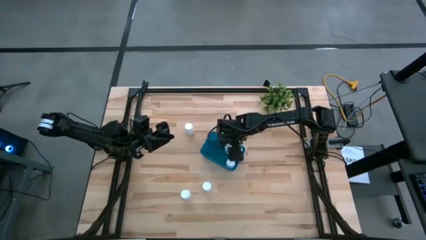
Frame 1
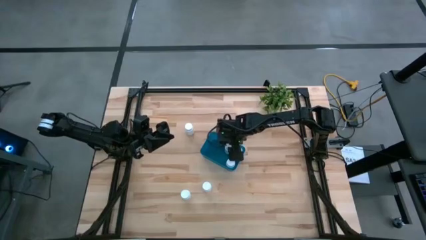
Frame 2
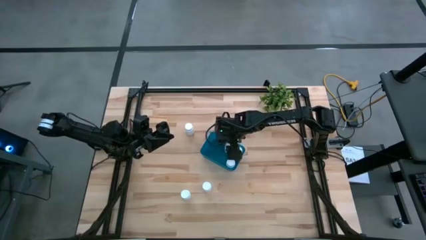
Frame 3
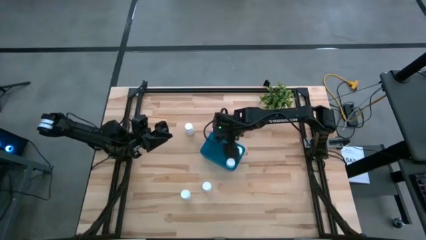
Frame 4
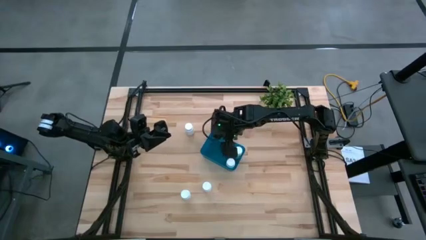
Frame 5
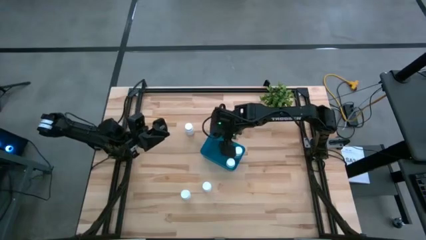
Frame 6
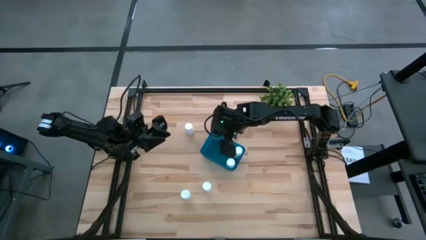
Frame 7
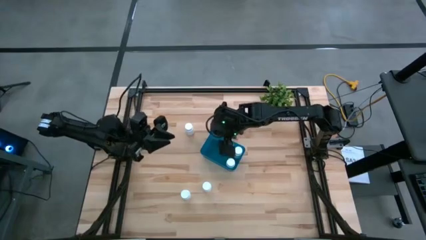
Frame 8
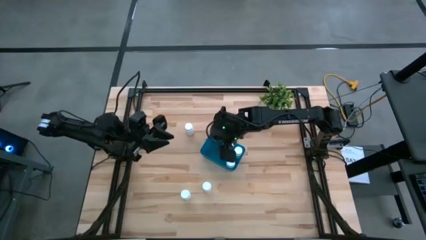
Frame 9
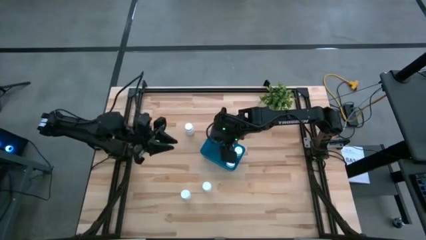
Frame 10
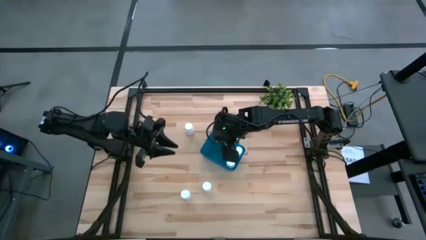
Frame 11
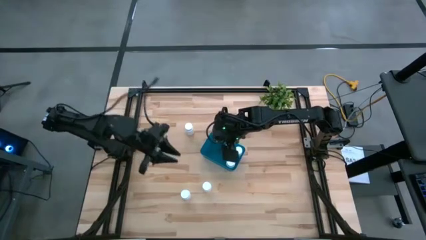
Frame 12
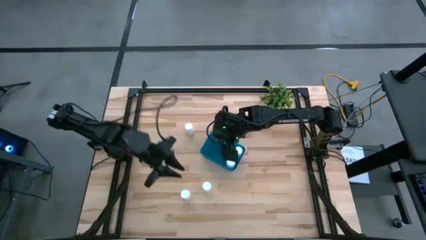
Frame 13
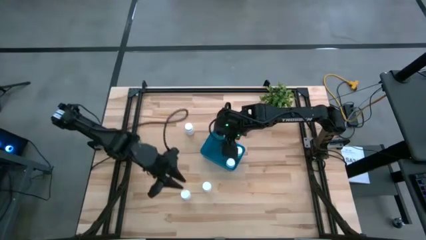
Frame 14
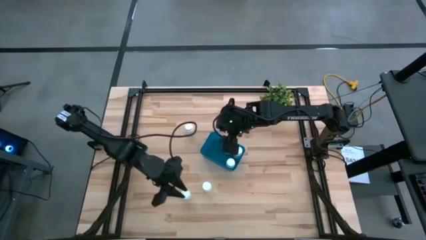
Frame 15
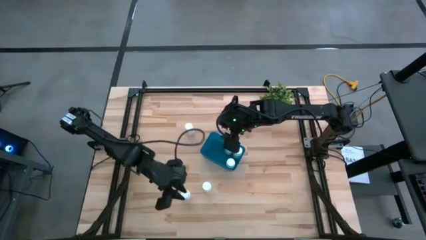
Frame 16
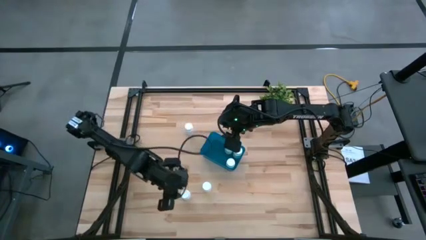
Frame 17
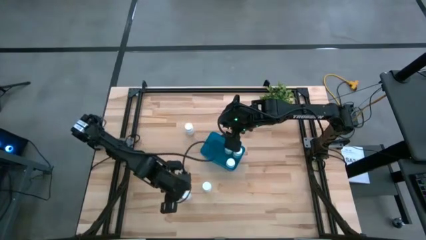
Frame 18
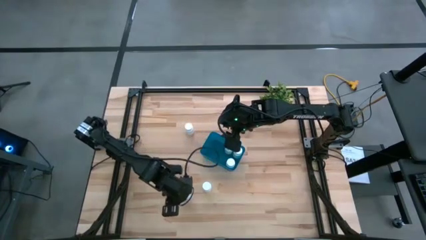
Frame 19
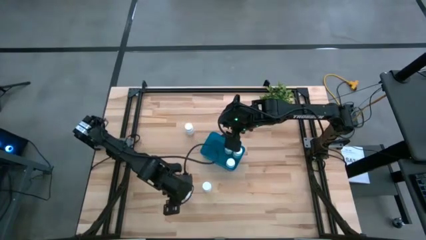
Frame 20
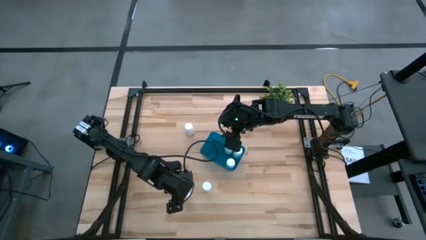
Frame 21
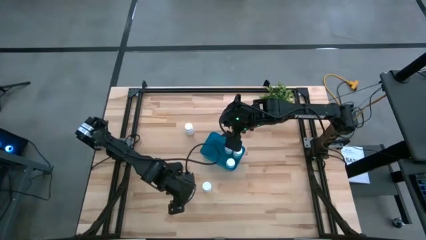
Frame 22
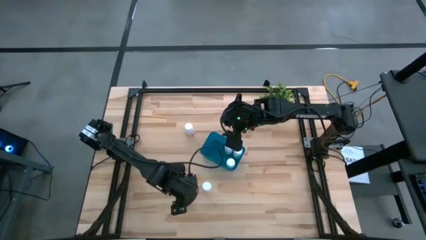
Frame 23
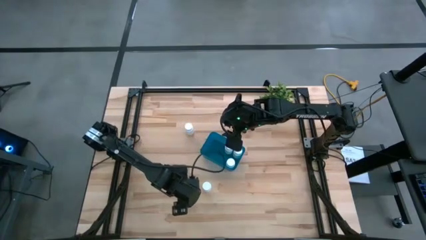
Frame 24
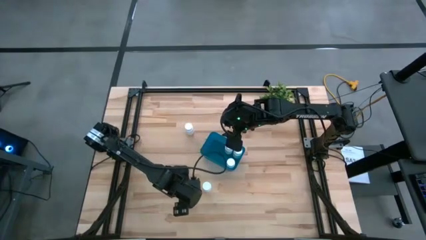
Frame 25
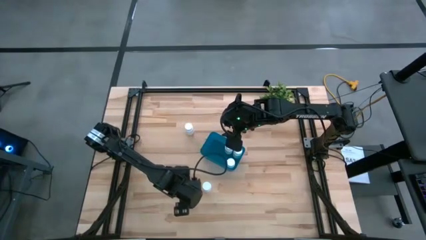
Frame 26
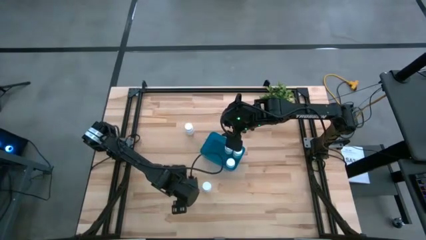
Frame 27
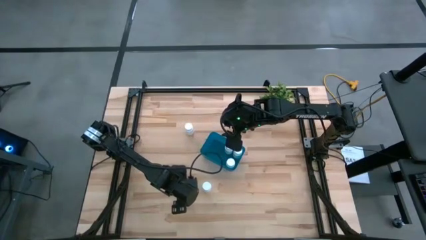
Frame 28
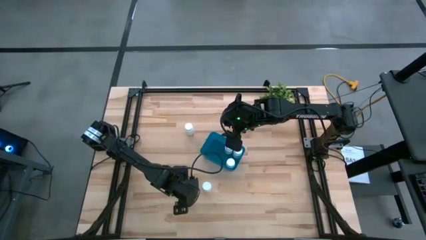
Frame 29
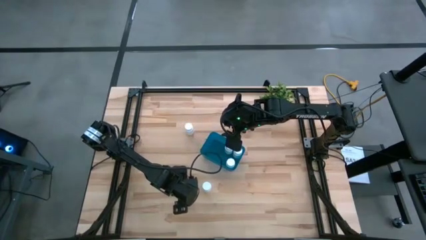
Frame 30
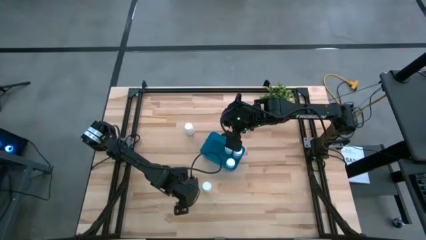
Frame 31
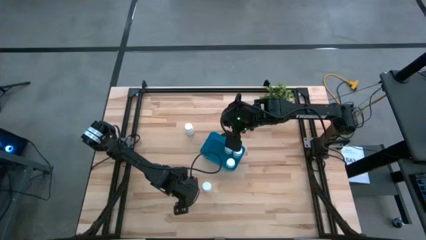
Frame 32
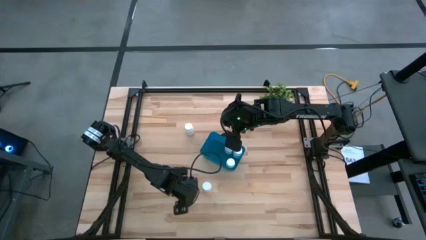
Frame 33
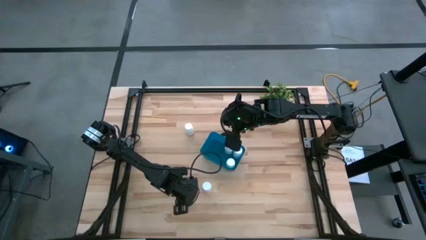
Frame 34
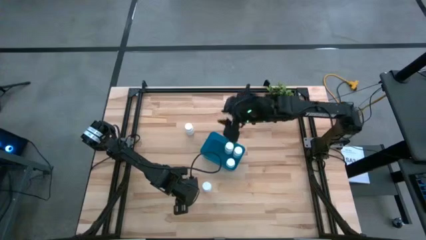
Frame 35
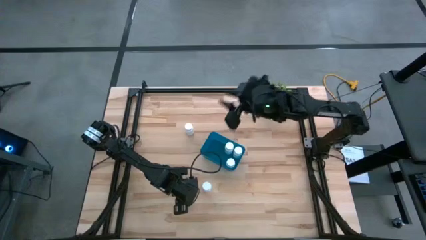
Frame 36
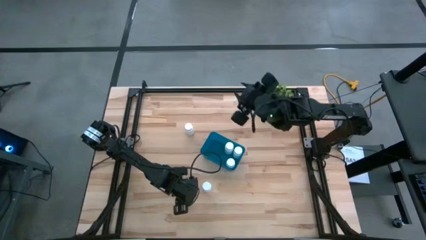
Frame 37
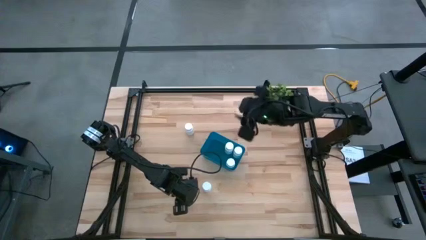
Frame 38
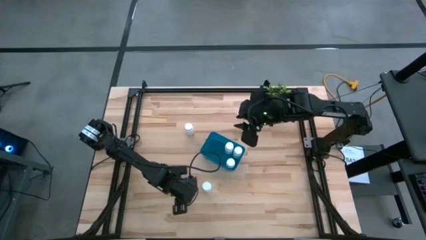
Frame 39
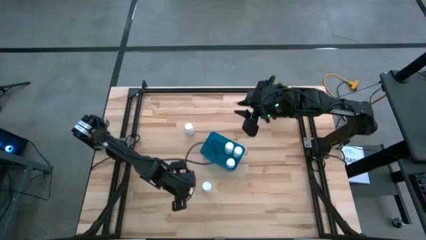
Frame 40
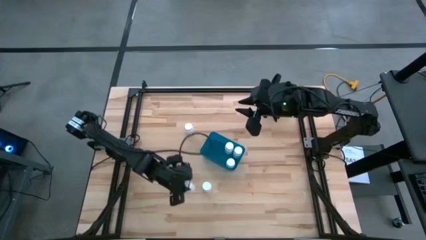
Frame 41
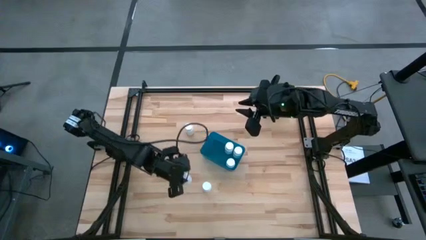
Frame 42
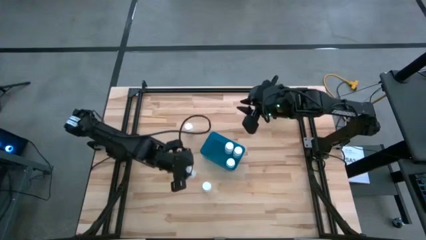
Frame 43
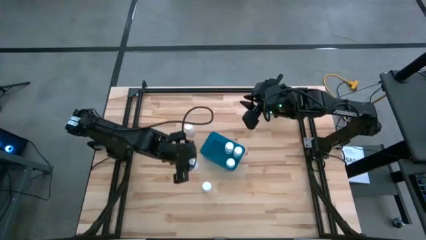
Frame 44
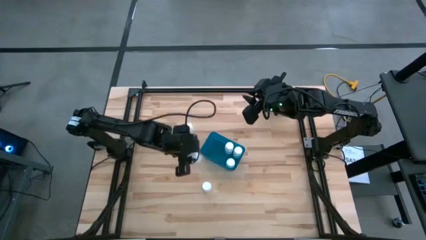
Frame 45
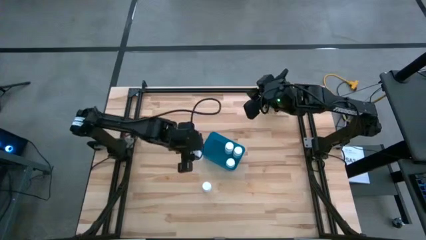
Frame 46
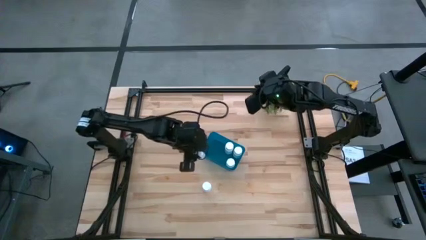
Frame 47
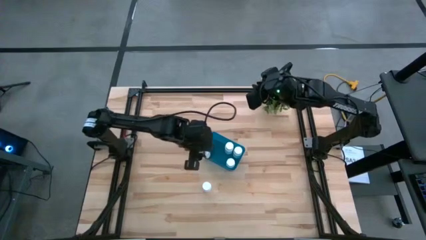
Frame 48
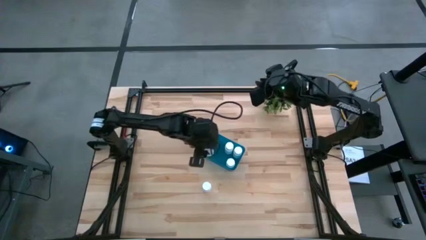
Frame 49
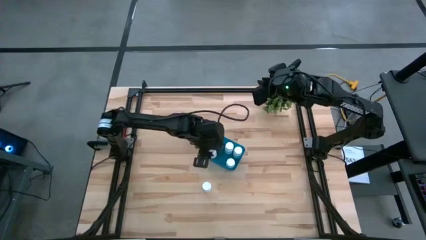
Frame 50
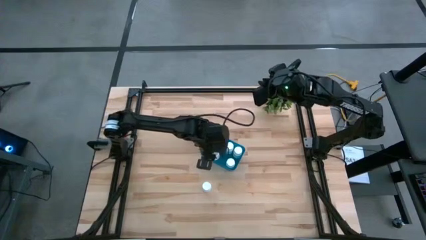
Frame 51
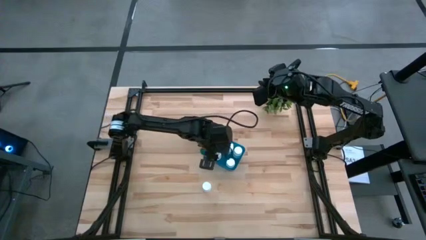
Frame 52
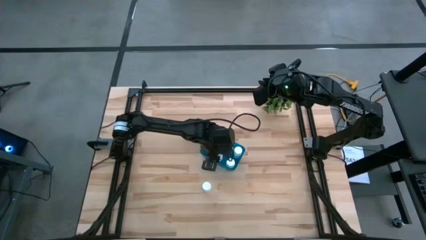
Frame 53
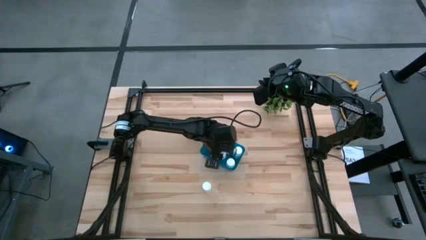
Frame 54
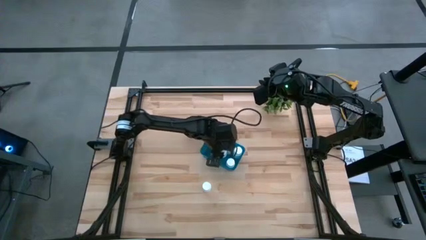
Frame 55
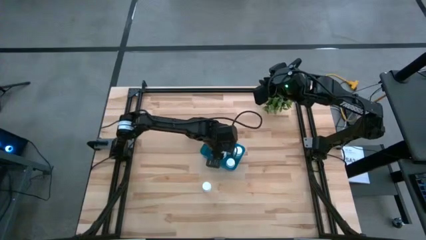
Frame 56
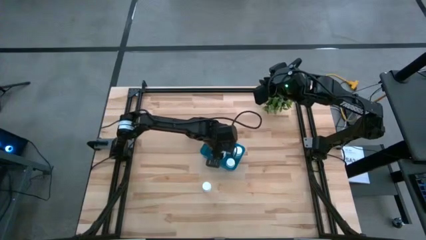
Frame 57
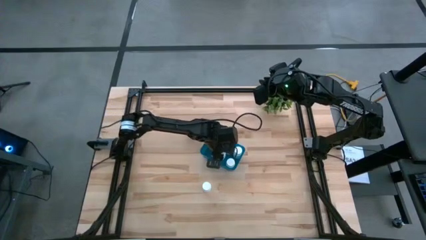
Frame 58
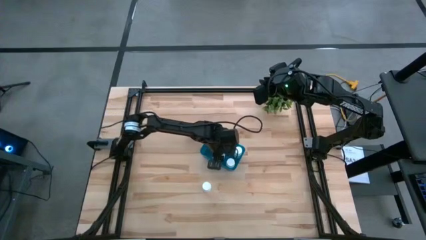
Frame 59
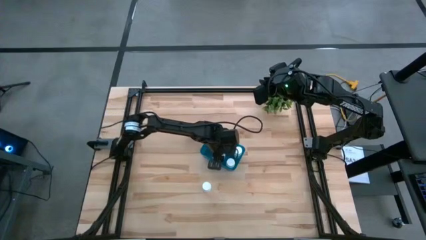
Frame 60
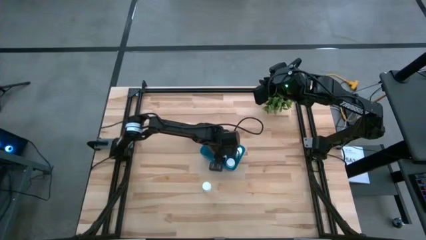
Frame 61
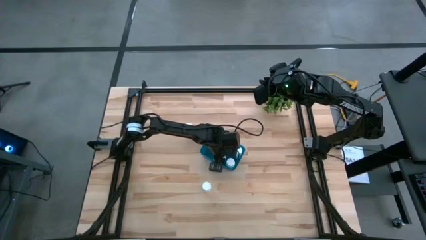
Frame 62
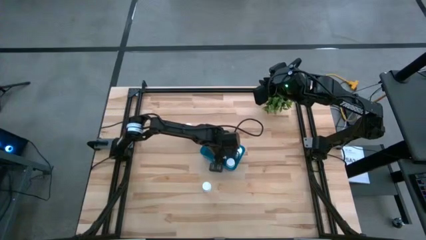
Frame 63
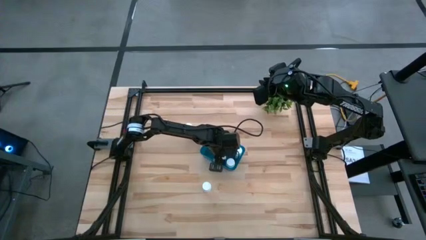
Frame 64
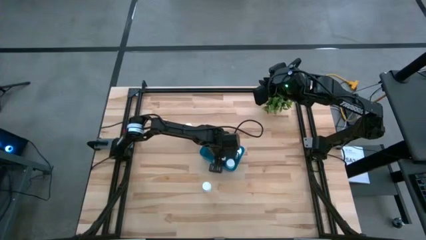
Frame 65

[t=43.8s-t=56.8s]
Task: Pick and place pill bottles into a basket
Put the white pill bottle into the blue bin
